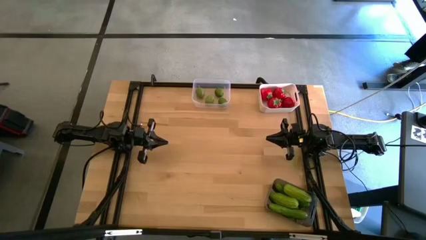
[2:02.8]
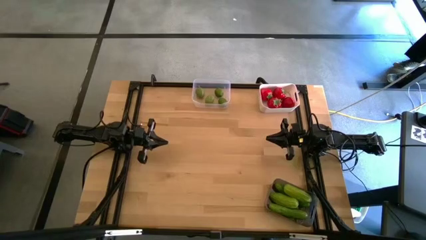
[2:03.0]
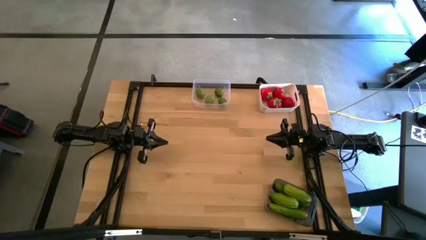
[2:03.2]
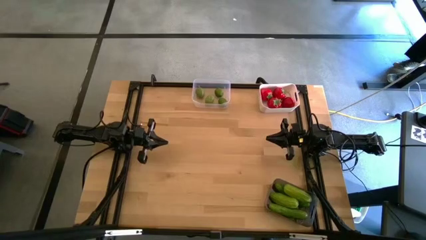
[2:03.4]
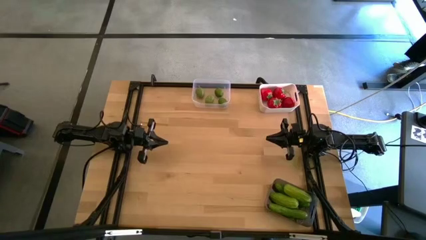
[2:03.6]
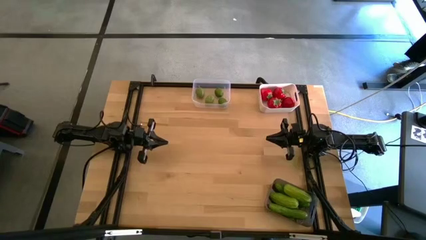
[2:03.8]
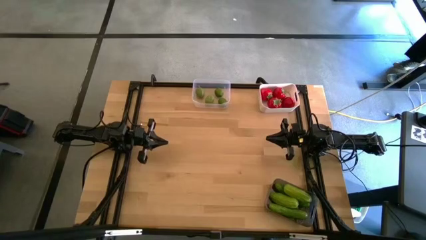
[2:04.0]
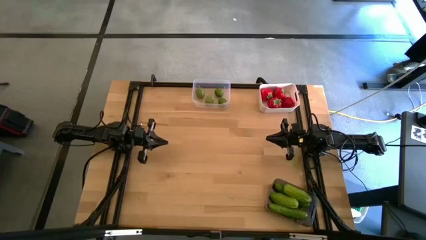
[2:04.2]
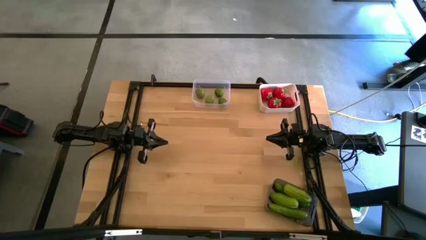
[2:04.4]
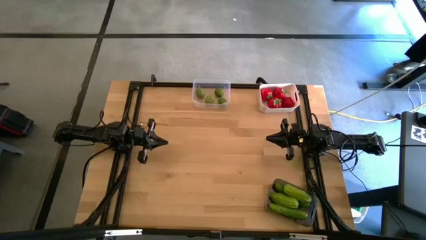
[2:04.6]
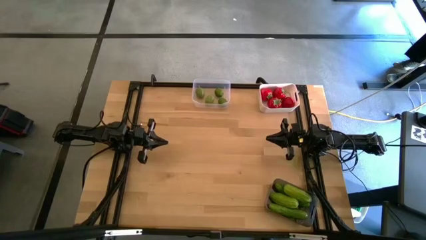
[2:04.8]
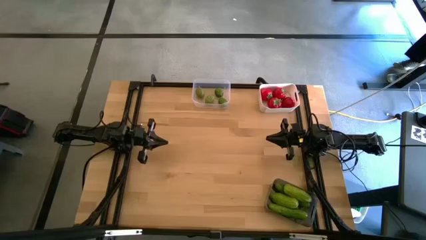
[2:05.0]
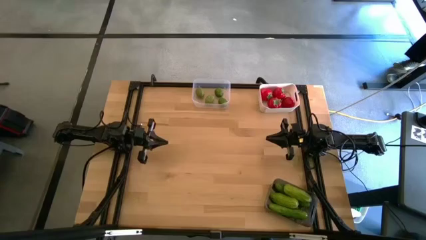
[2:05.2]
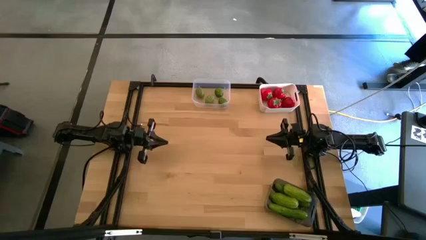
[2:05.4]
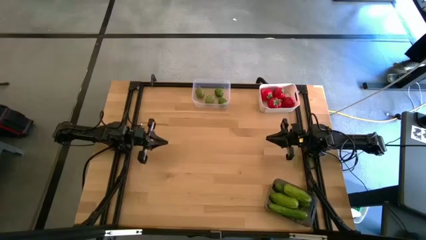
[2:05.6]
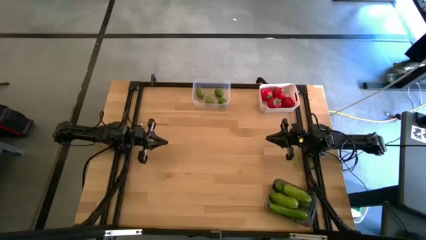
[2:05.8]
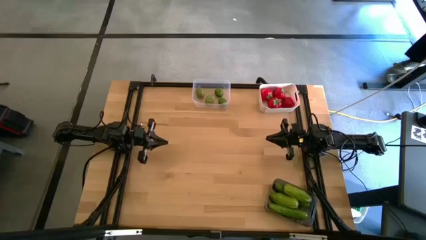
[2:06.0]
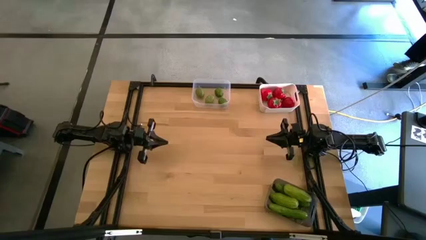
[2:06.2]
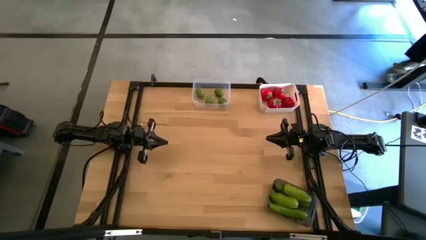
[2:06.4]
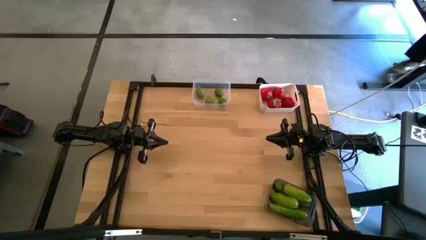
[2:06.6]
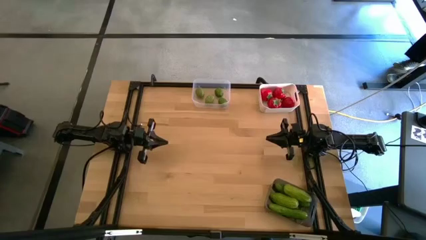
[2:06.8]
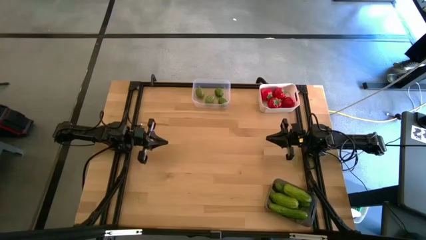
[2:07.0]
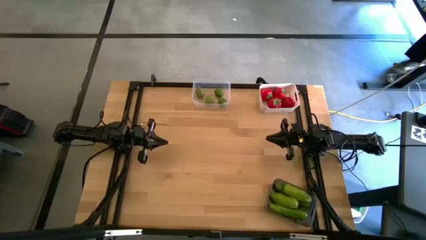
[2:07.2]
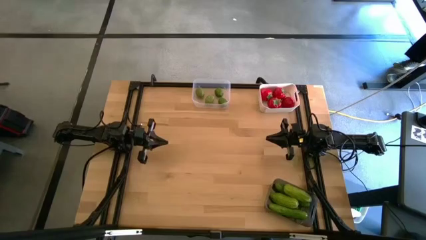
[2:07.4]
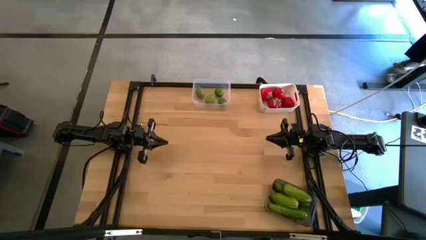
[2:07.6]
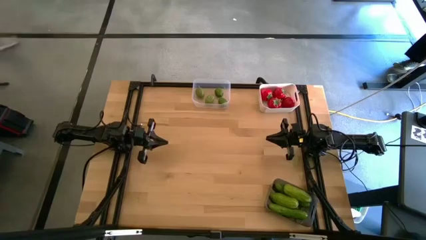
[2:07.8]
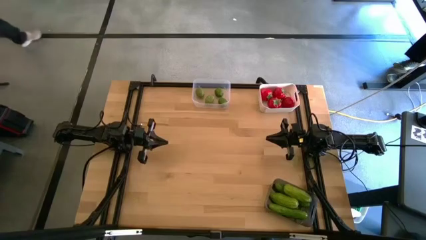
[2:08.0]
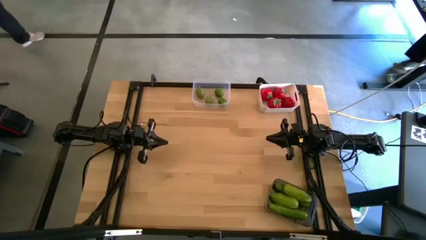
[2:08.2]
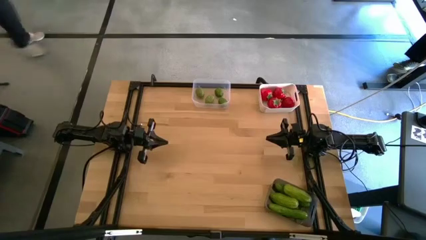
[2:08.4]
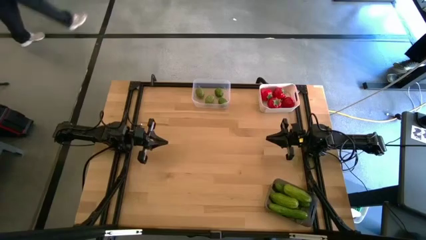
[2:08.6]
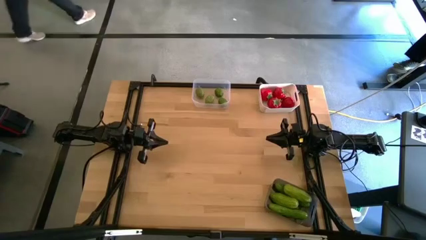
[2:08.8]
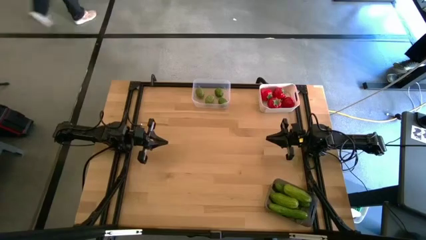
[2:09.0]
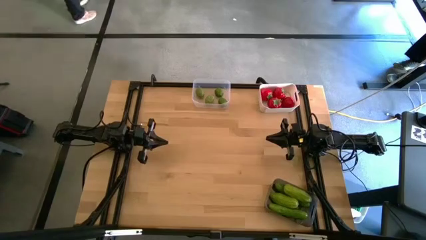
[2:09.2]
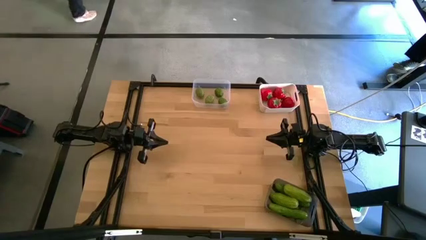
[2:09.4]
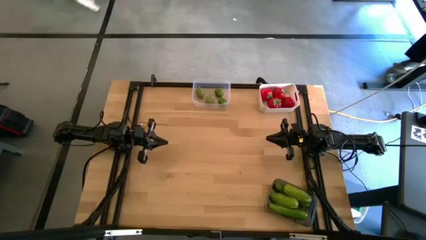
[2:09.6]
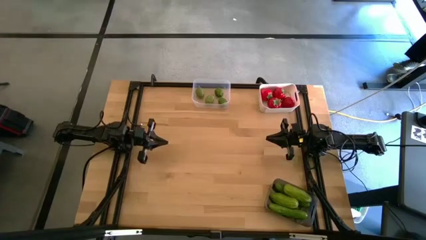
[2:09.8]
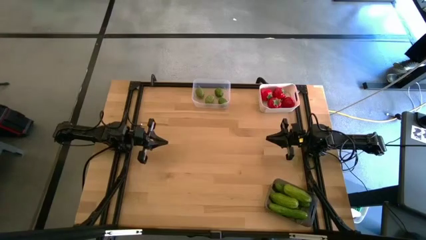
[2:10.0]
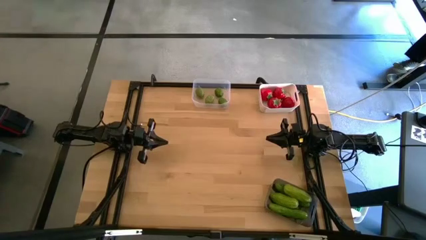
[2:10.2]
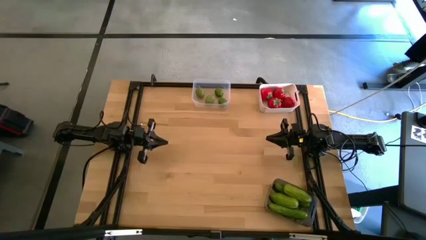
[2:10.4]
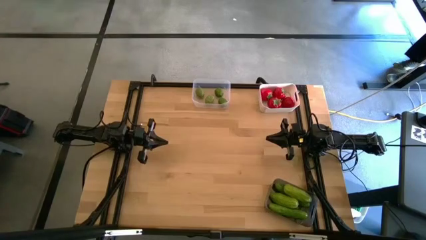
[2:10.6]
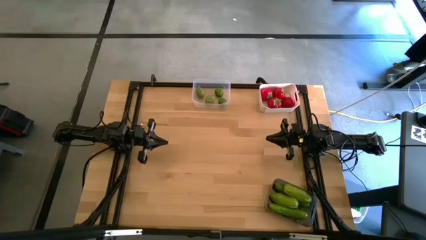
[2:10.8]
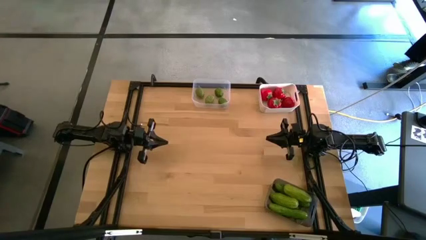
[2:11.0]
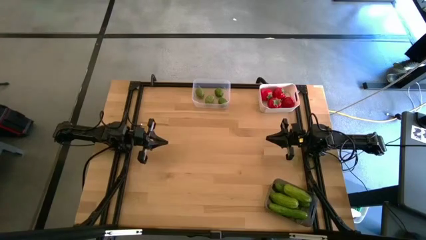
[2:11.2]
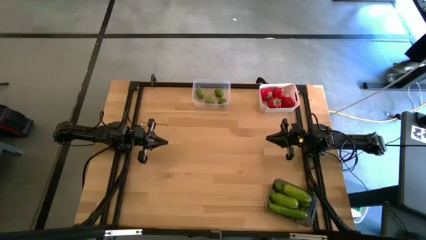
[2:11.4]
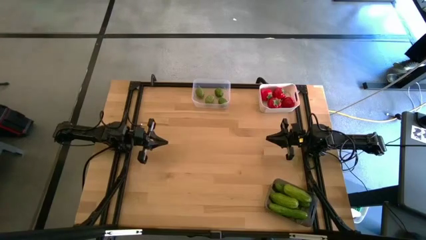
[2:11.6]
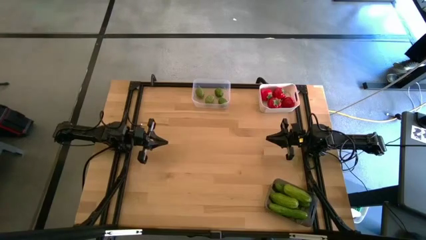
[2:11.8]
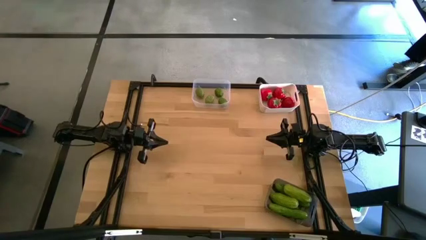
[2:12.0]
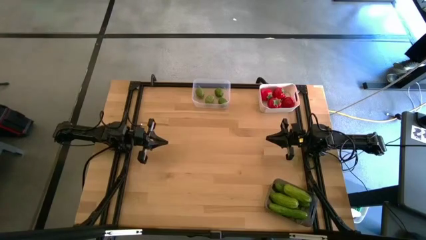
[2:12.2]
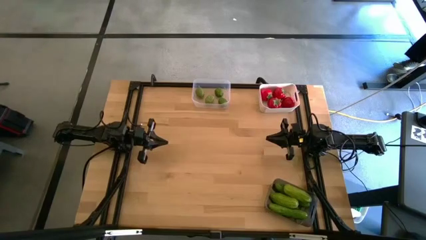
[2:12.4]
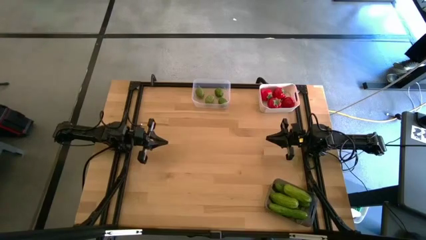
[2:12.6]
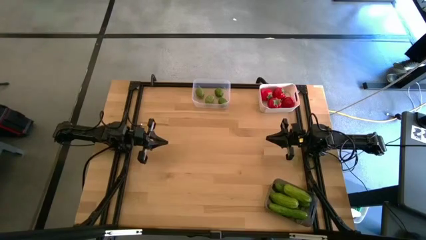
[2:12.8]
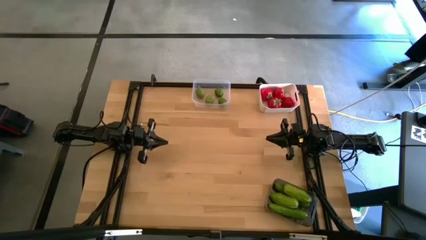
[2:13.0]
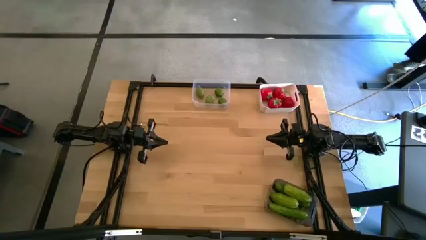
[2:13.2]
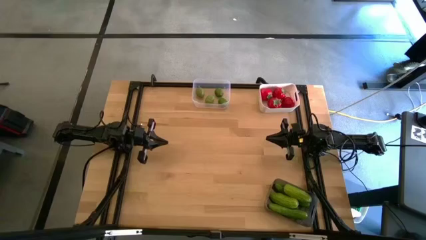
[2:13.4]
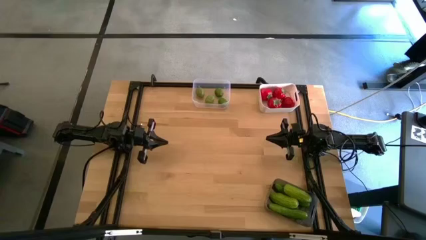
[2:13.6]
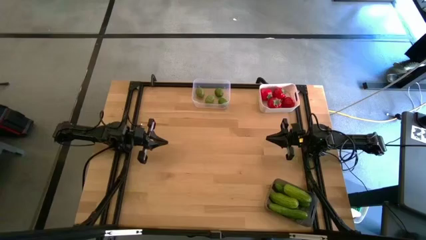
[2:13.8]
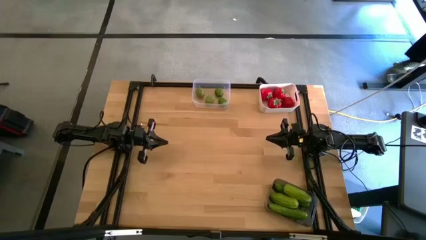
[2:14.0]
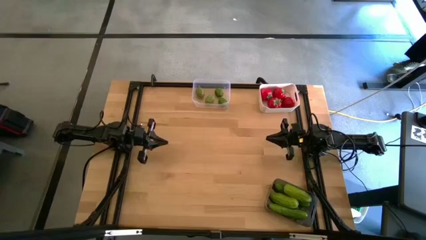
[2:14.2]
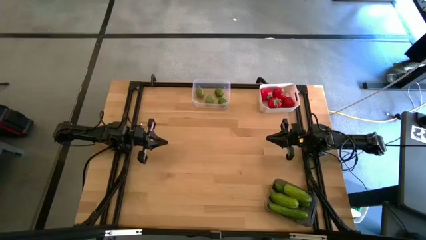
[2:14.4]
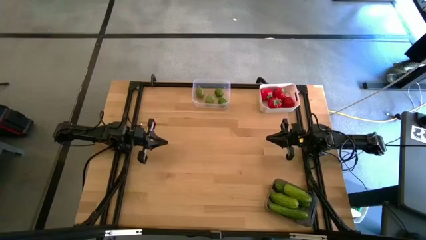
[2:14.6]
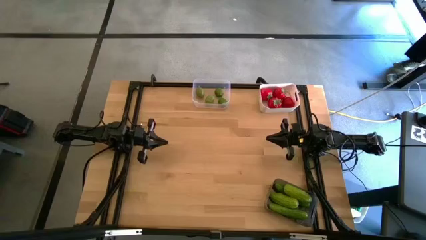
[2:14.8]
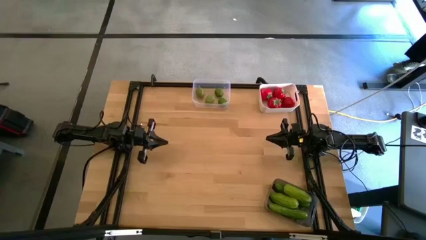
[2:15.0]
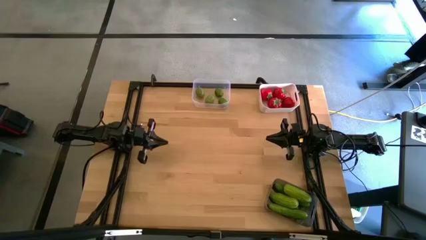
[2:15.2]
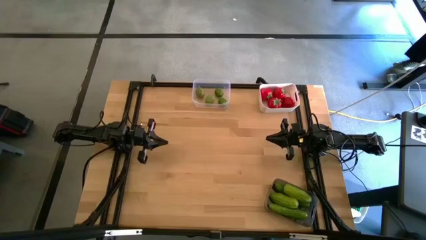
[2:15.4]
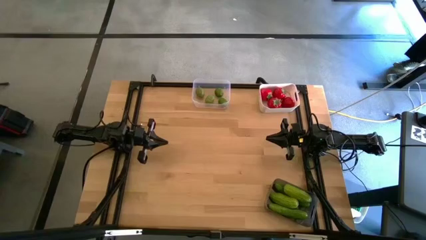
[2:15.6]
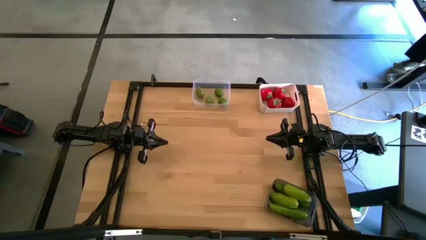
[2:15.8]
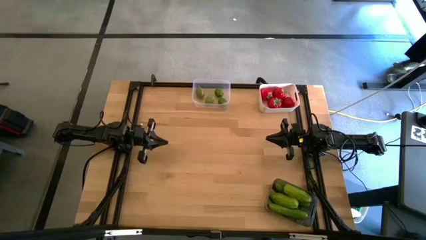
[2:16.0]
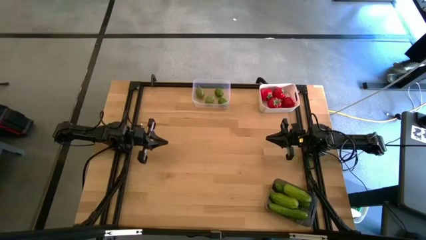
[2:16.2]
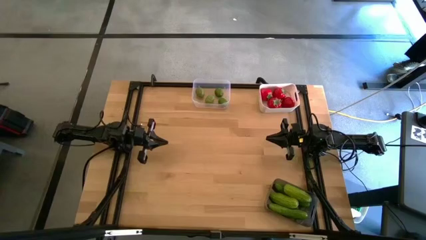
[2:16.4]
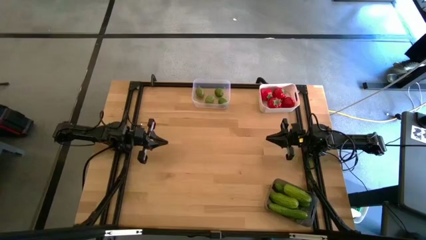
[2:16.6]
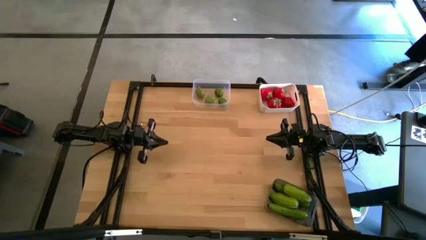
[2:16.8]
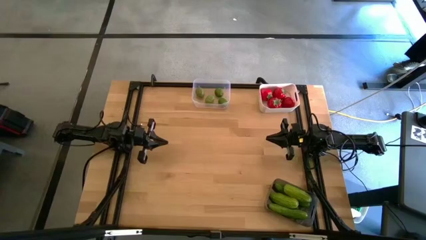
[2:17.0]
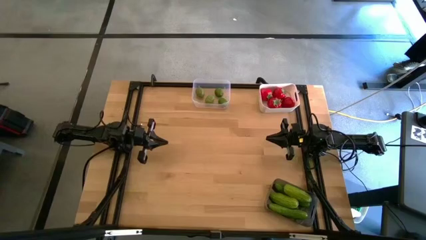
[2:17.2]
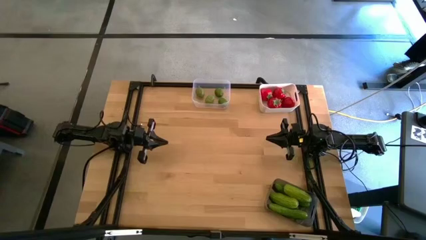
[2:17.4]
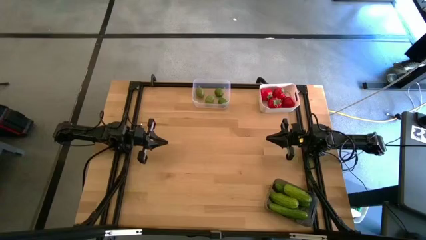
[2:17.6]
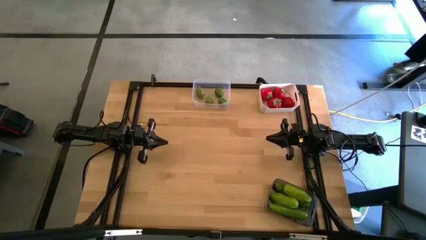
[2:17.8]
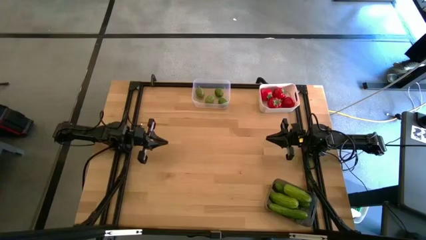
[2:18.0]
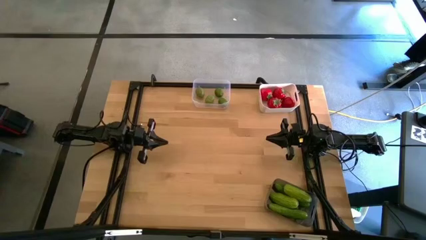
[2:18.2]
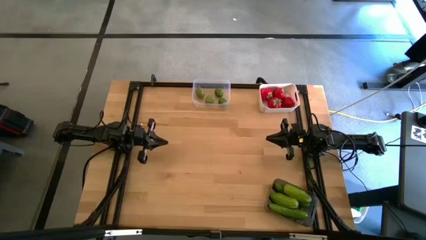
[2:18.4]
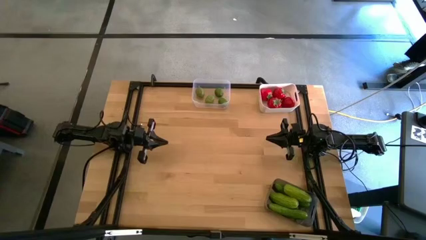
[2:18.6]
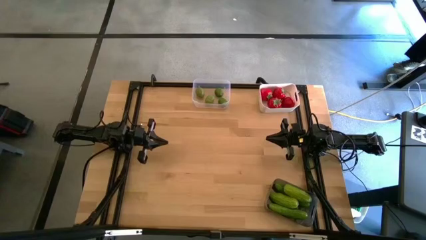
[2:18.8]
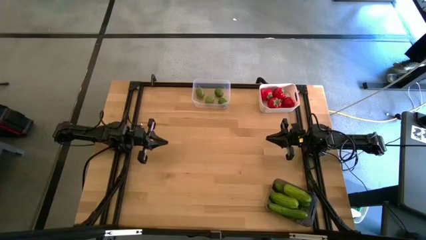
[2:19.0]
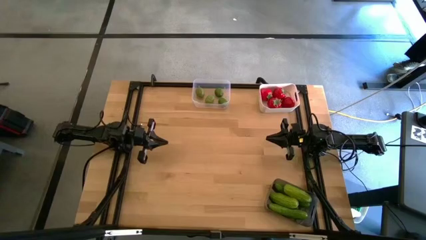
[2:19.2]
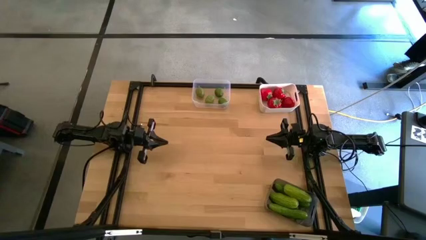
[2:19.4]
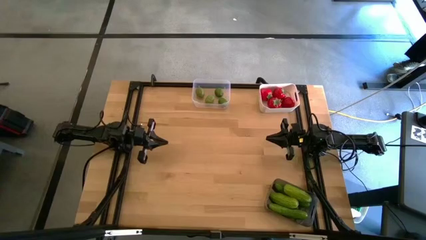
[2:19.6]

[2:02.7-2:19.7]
Task: Sort produce into baskets
Return to Home Position
